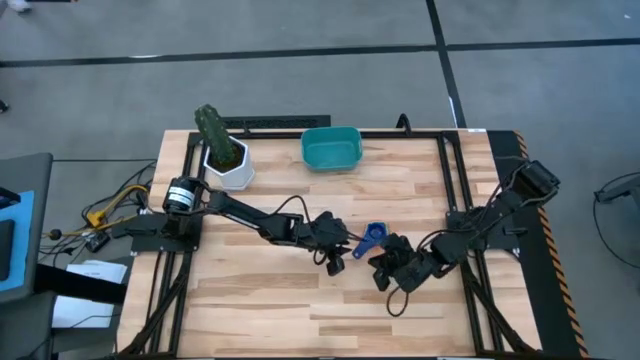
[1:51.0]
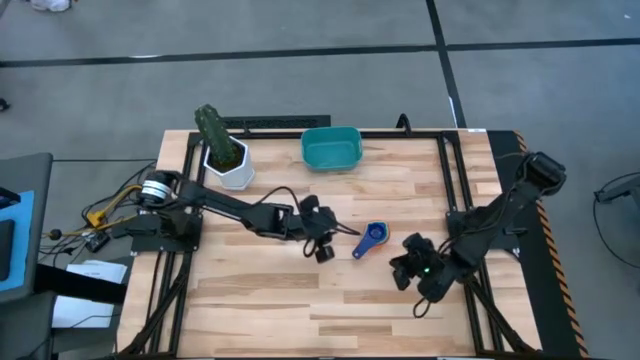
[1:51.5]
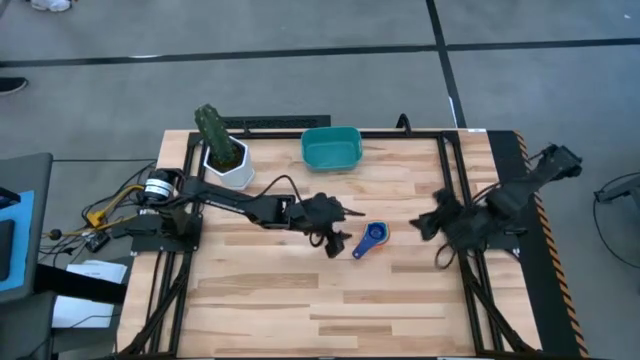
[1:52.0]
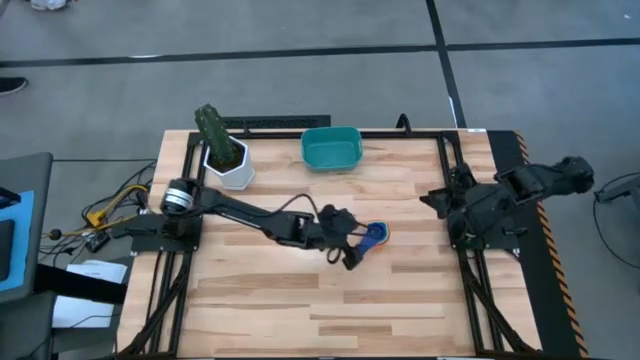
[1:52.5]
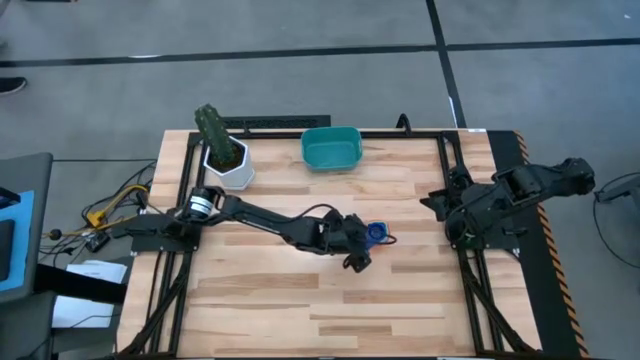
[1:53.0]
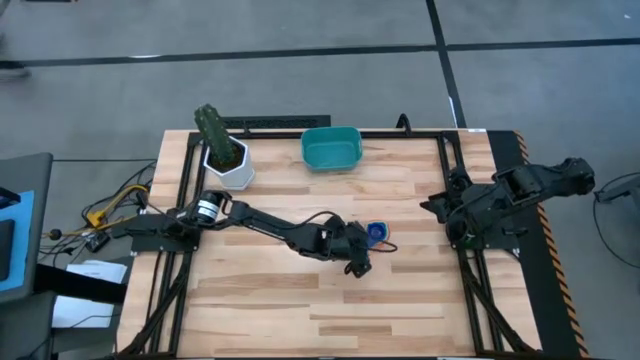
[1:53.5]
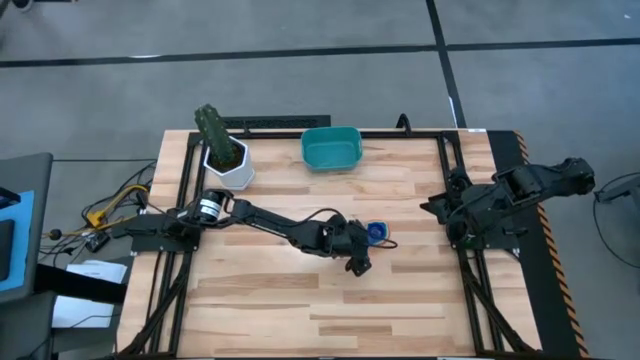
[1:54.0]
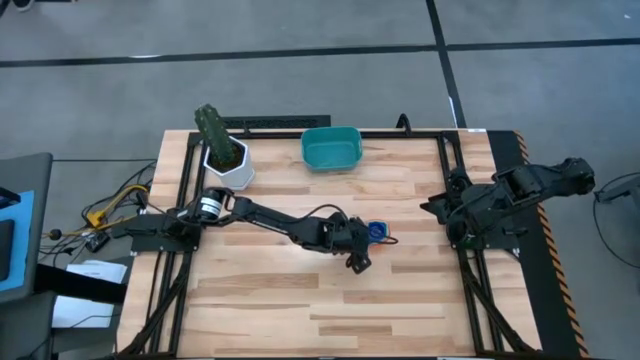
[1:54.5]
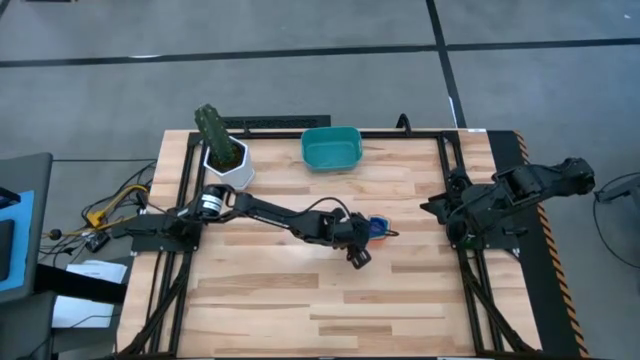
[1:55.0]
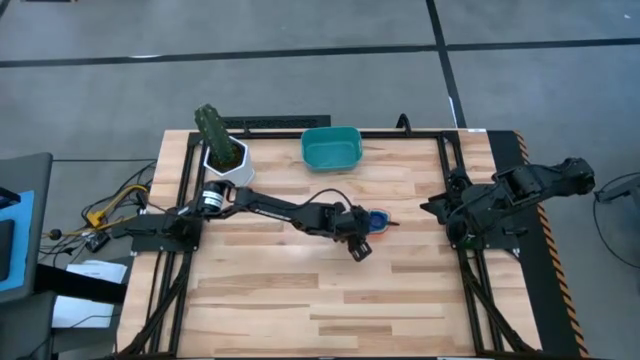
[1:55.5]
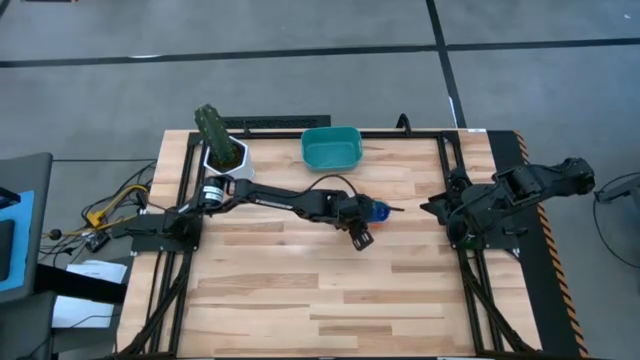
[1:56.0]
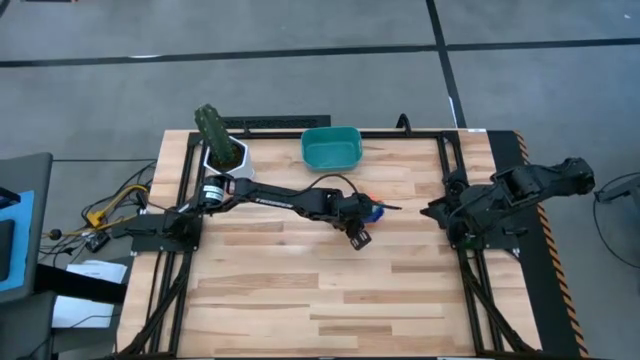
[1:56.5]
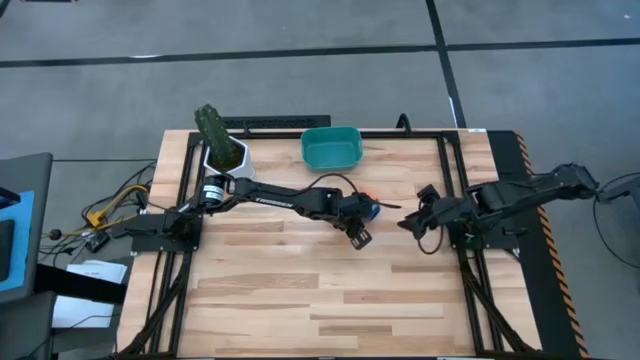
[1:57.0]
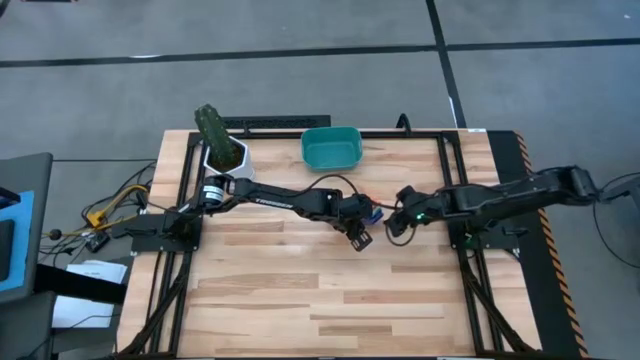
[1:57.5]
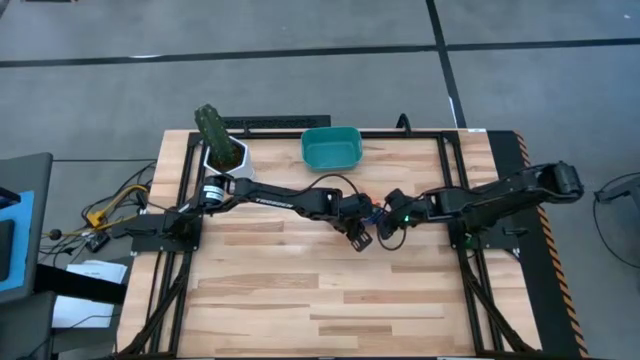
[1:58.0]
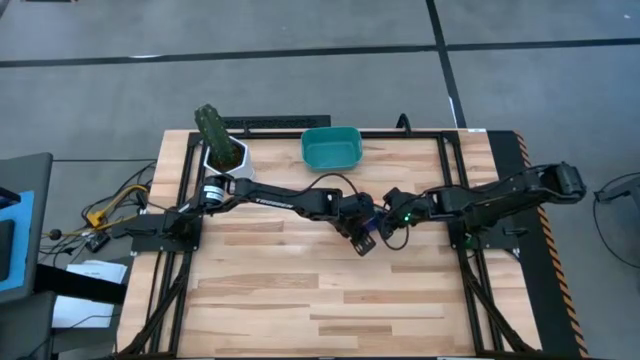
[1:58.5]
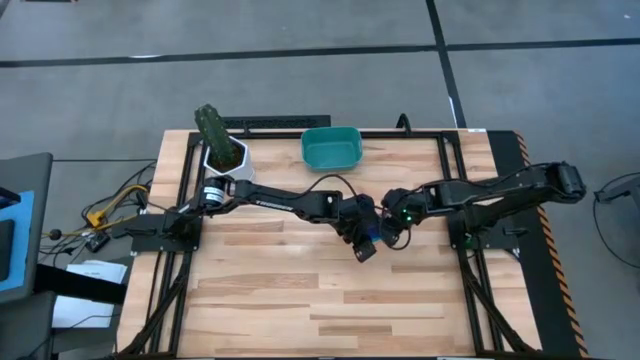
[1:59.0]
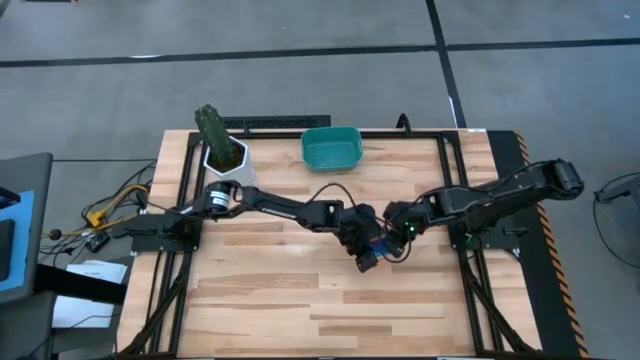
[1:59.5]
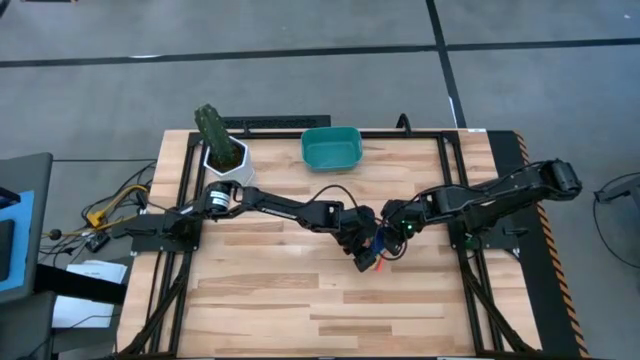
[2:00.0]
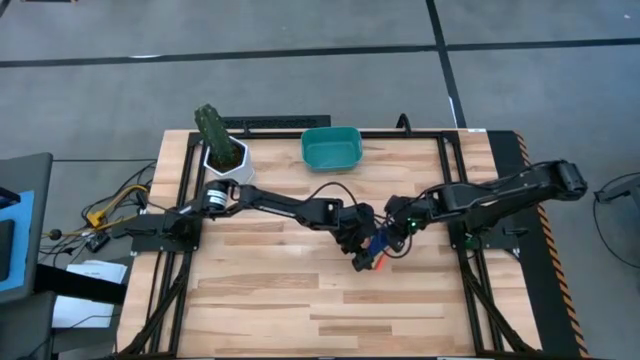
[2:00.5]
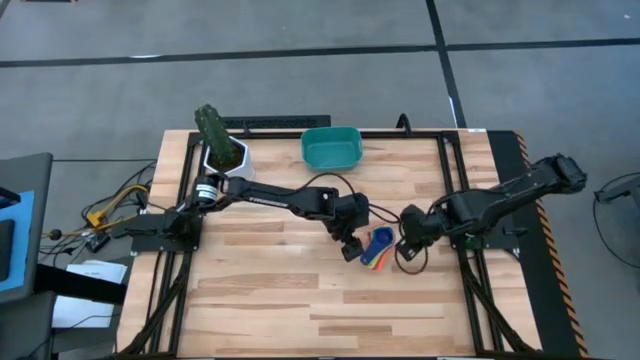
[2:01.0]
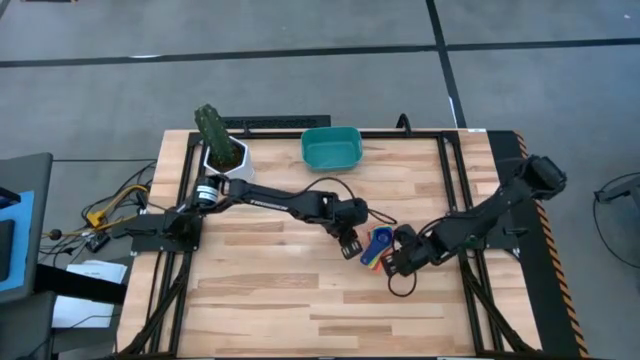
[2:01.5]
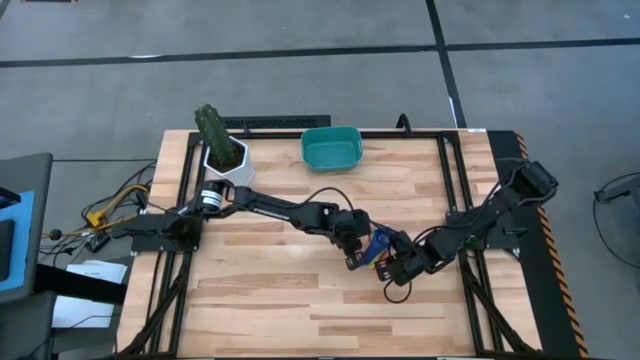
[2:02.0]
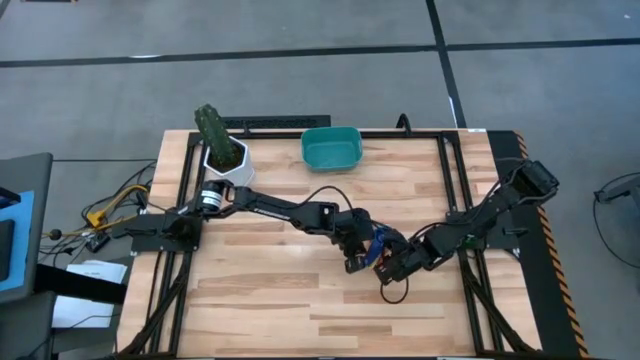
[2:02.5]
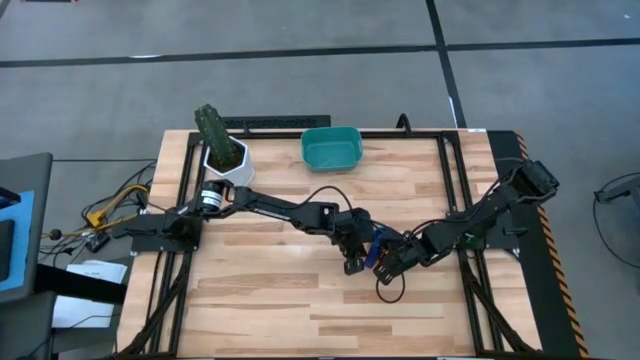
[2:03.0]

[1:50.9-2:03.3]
Task: Nest measuring cups in basket
Put the stacked measuring cups into the blue bin

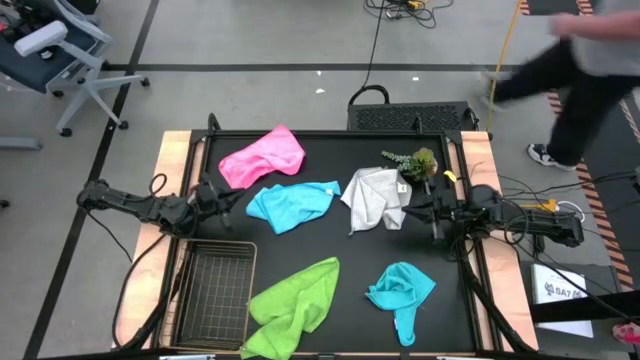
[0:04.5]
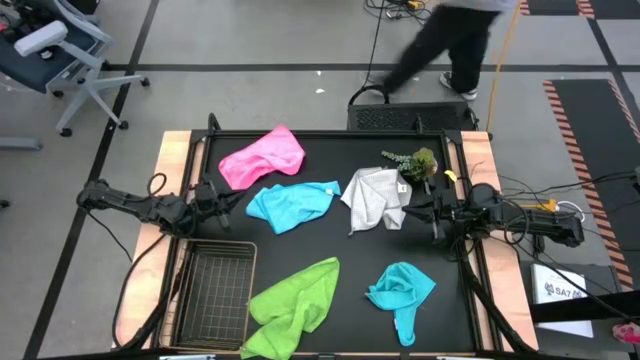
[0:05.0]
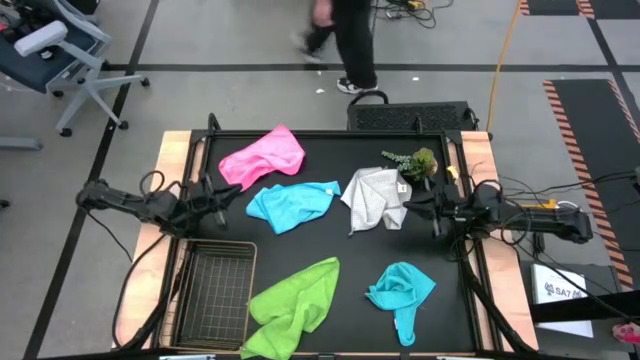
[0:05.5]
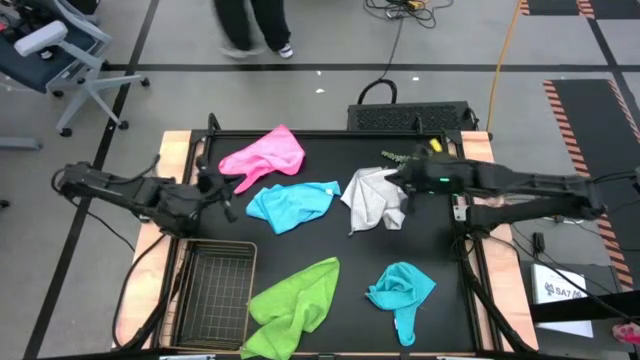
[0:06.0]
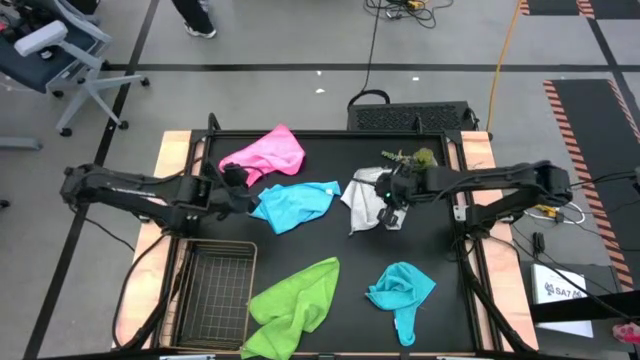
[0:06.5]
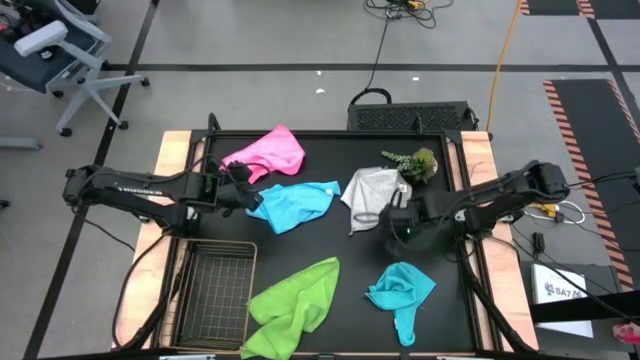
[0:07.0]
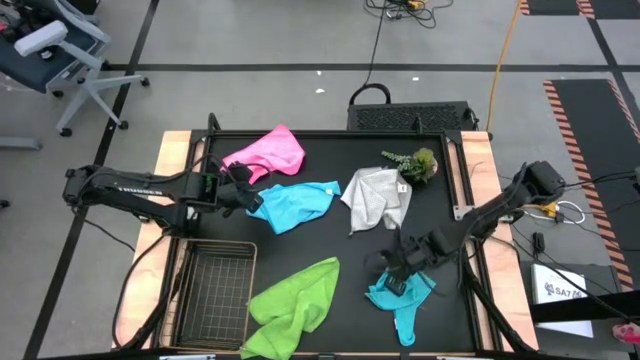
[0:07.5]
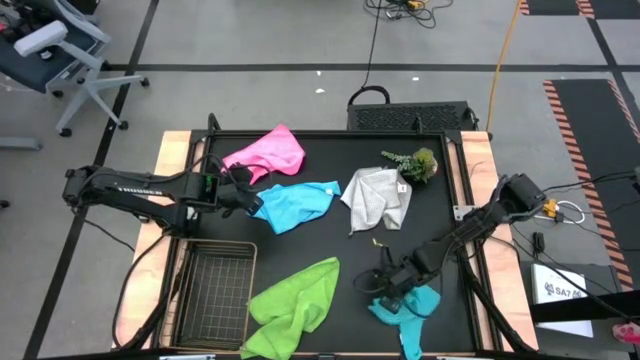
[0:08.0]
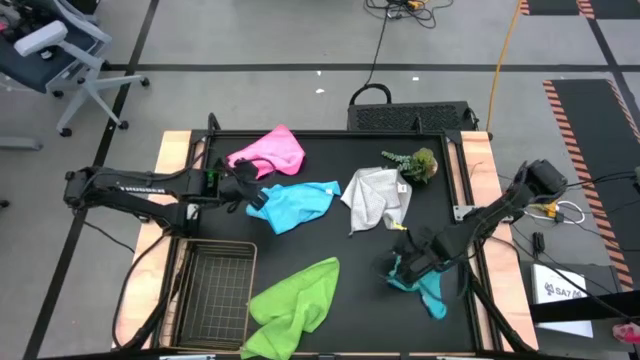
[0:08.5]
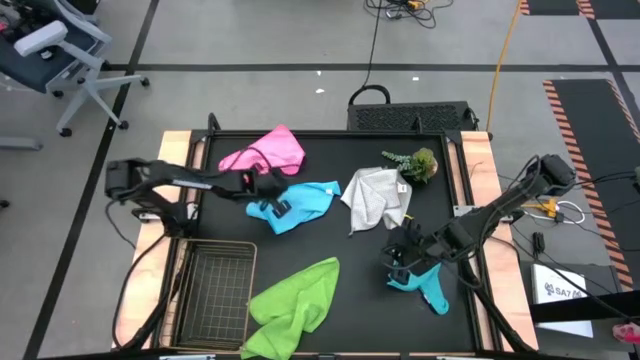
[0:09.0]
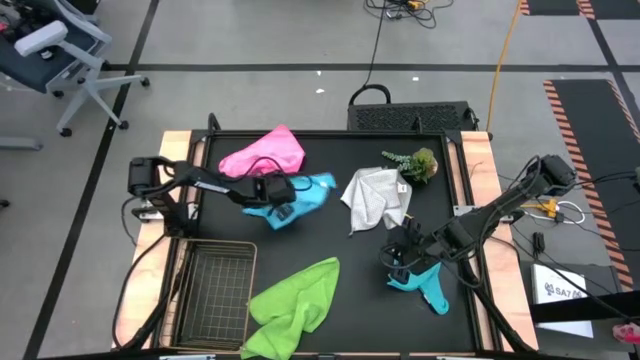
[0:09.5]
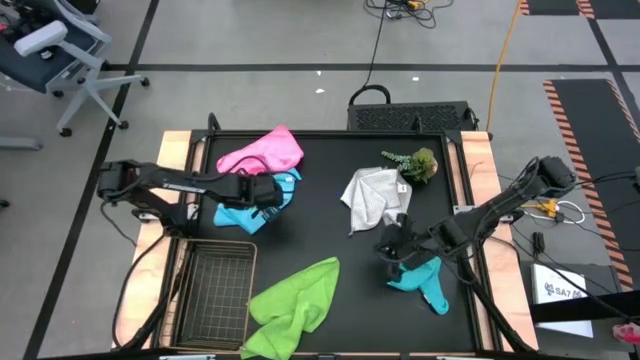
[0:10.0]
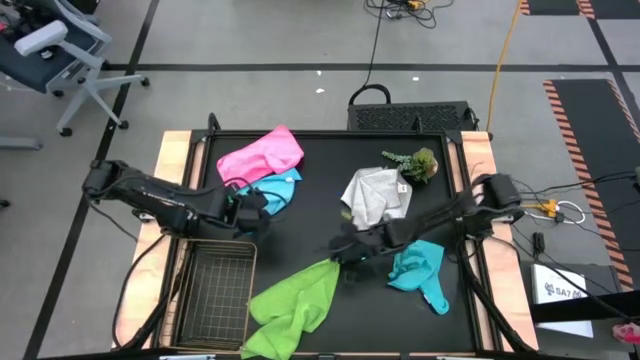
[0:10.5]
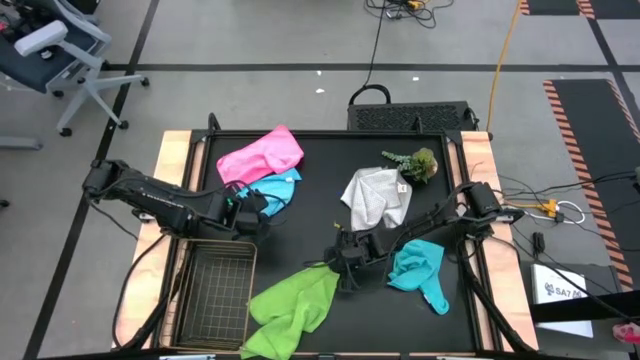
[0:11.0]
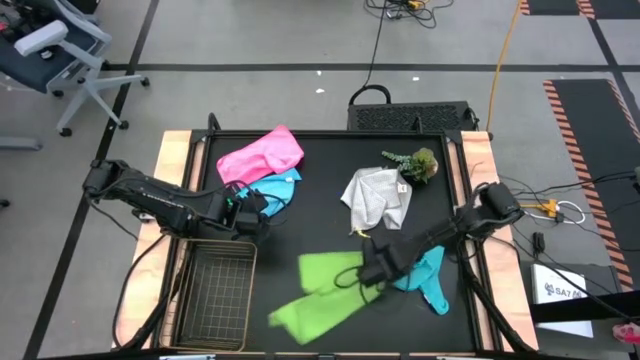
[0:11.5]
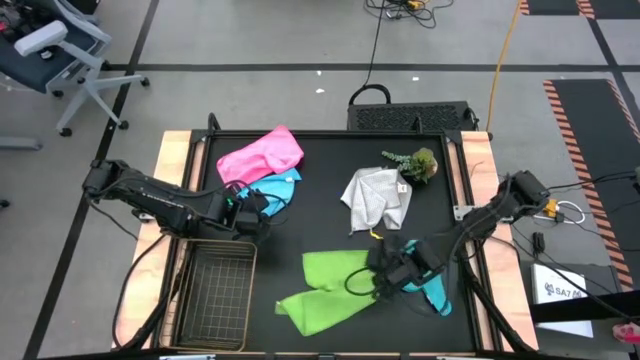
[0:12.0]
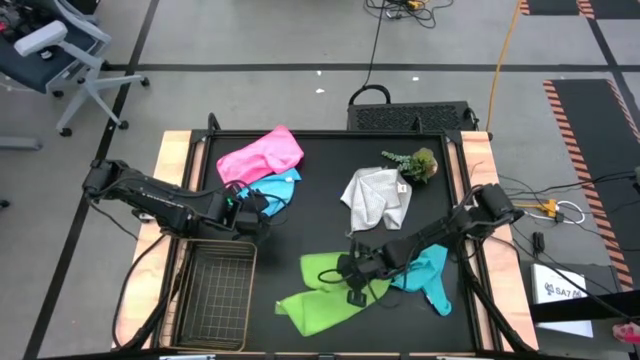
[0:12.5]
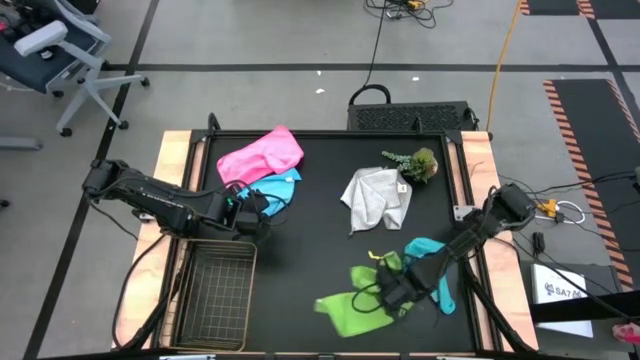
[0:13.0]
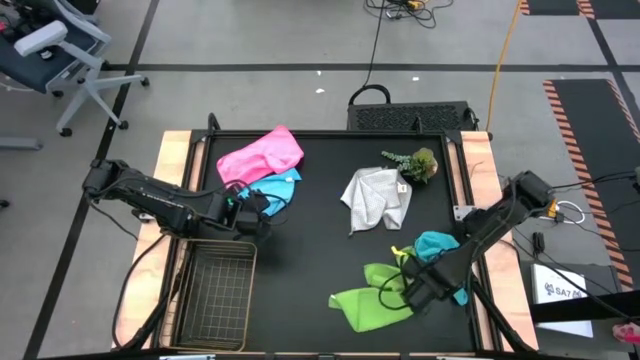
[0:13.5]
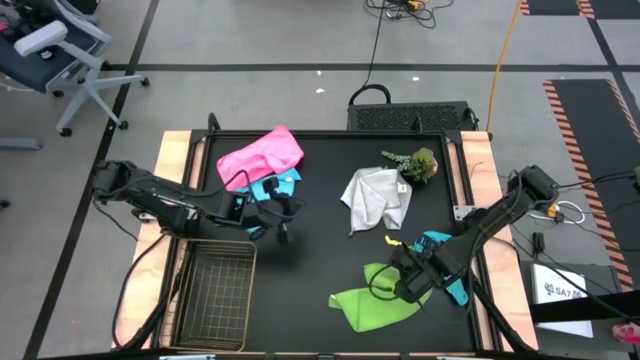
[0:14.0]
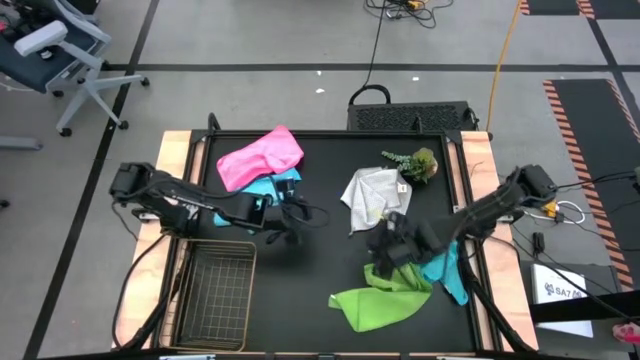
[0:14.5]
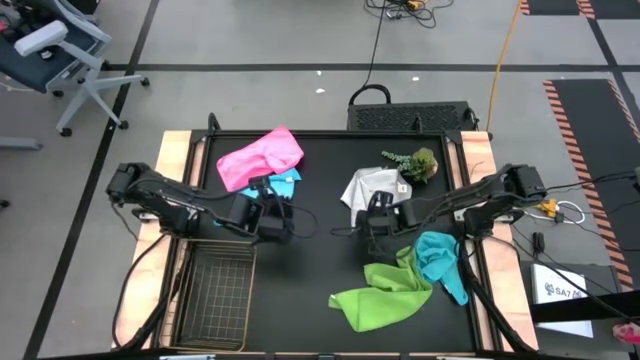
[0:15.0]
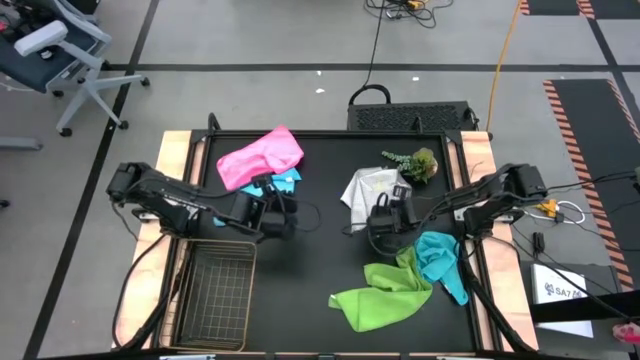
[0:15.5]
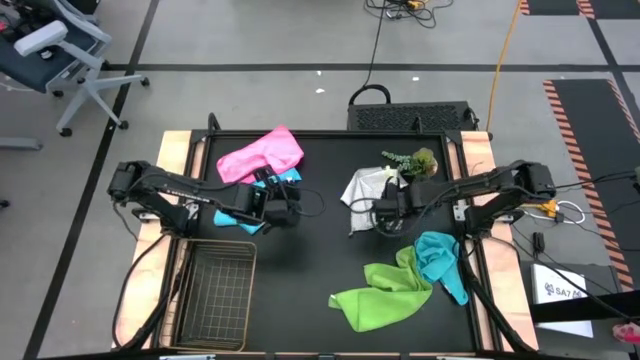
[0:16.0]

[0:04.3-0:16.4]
Task: Fold microfiber towels
Adjust the microfiber cloths
